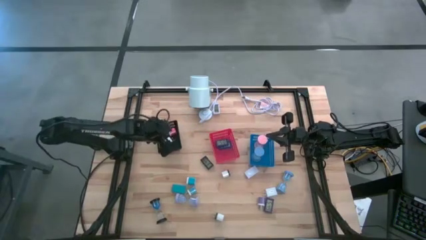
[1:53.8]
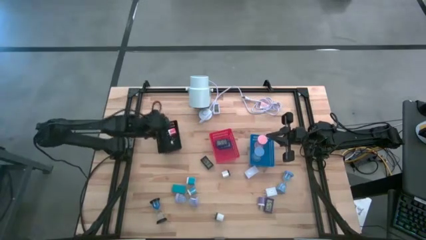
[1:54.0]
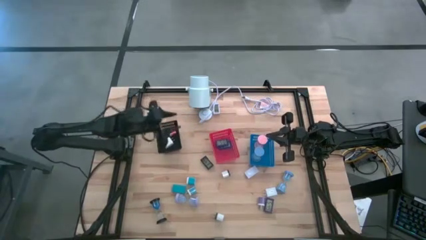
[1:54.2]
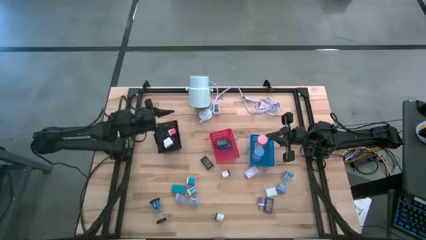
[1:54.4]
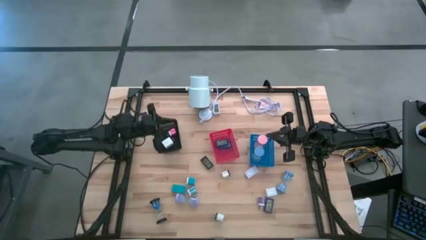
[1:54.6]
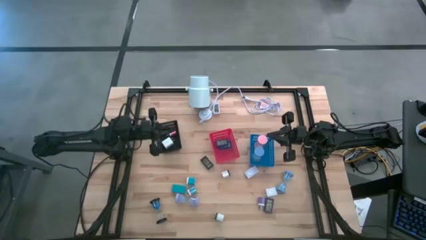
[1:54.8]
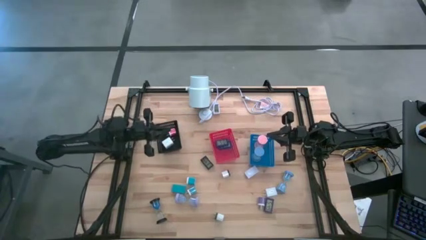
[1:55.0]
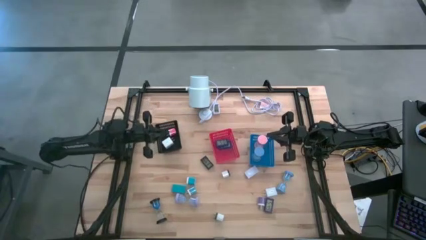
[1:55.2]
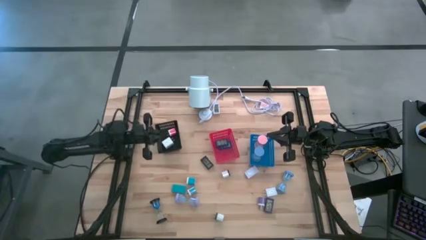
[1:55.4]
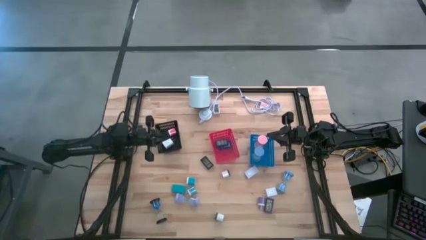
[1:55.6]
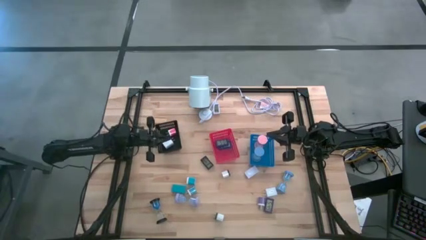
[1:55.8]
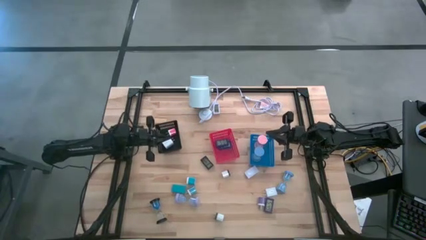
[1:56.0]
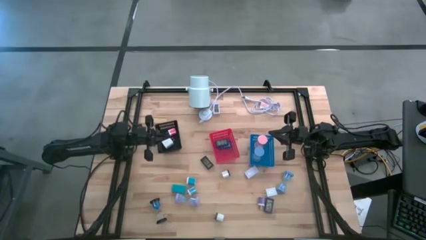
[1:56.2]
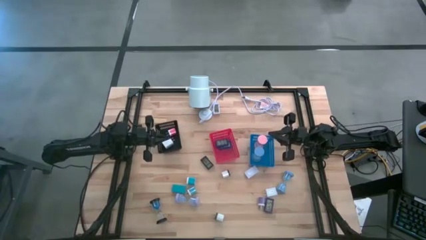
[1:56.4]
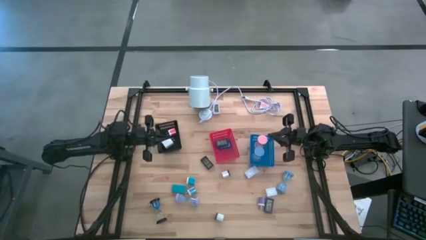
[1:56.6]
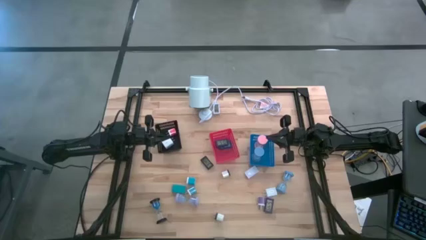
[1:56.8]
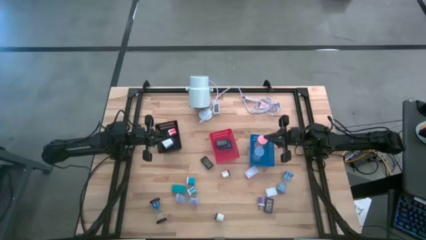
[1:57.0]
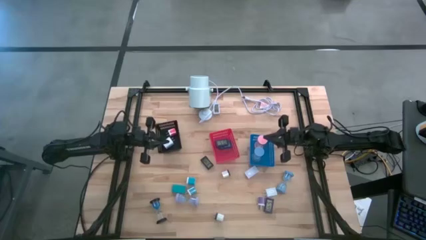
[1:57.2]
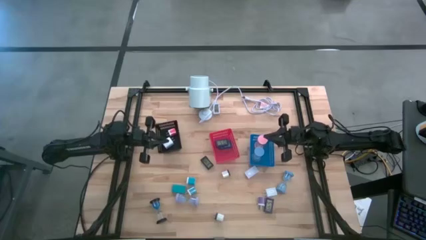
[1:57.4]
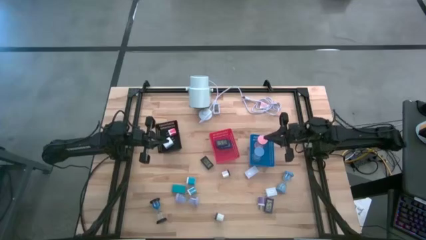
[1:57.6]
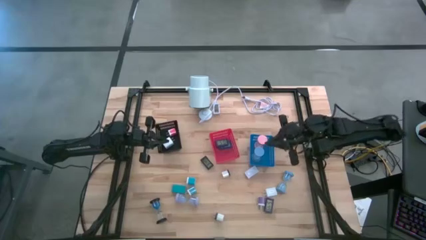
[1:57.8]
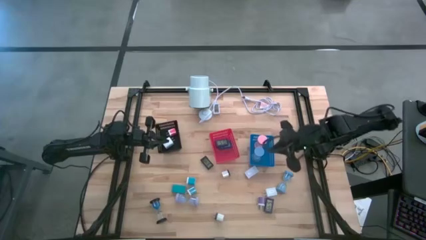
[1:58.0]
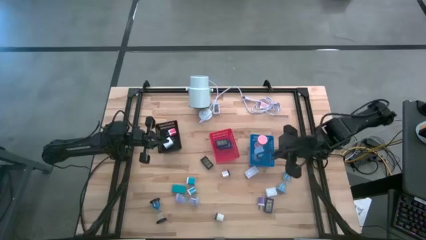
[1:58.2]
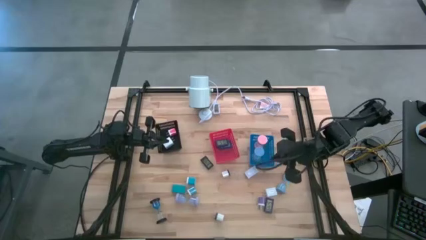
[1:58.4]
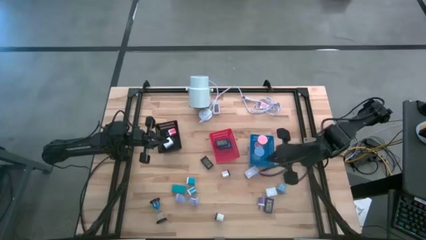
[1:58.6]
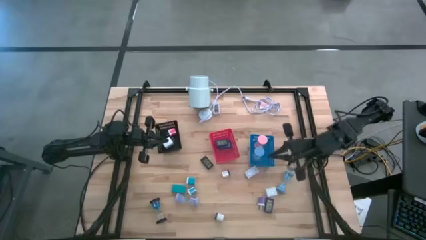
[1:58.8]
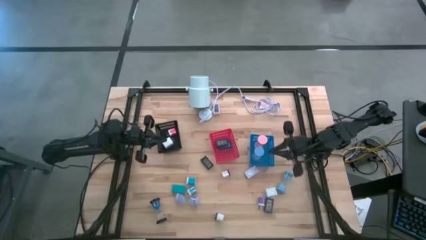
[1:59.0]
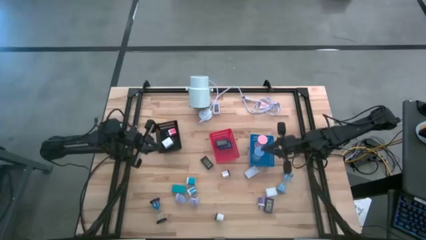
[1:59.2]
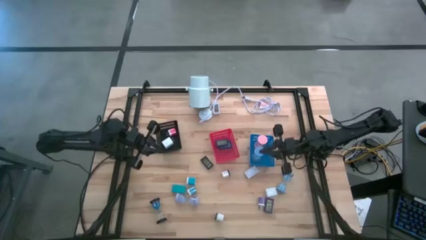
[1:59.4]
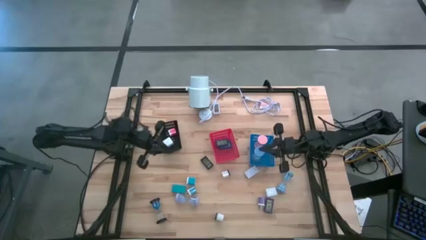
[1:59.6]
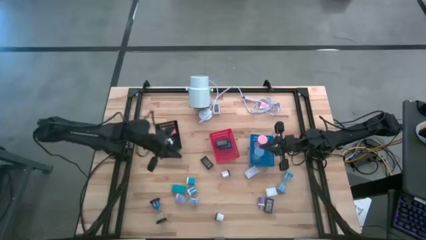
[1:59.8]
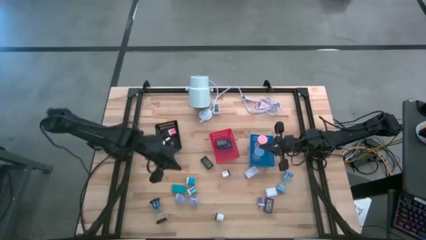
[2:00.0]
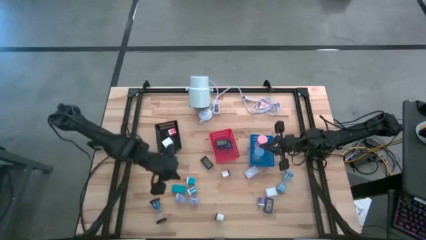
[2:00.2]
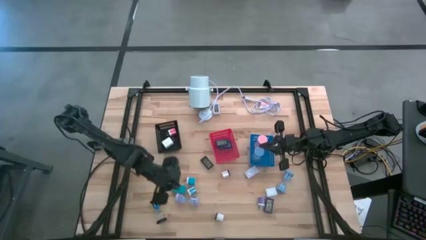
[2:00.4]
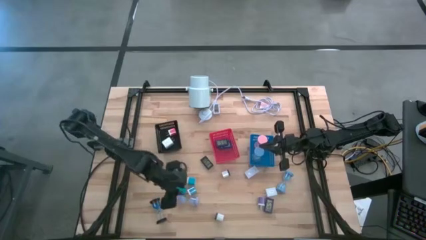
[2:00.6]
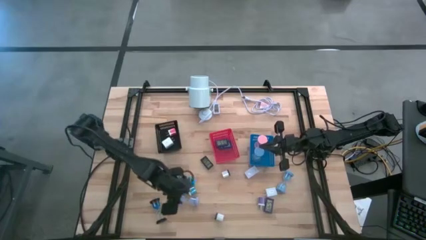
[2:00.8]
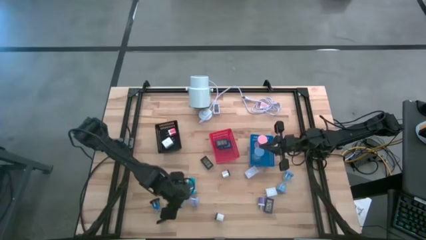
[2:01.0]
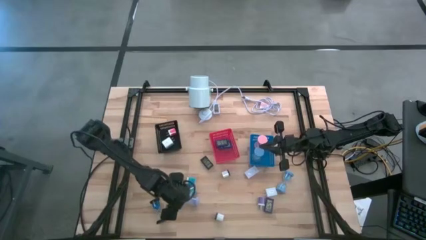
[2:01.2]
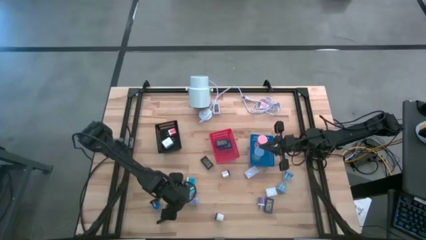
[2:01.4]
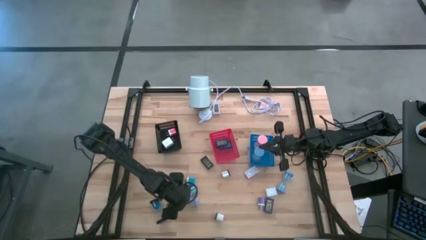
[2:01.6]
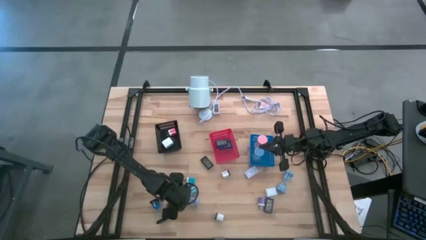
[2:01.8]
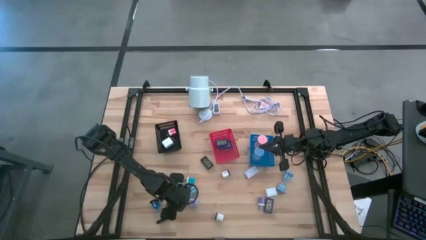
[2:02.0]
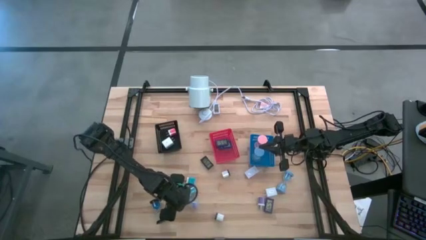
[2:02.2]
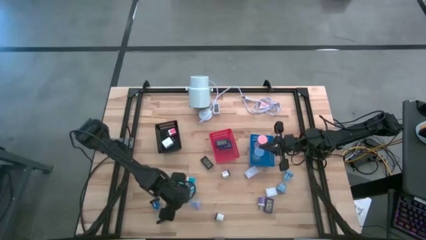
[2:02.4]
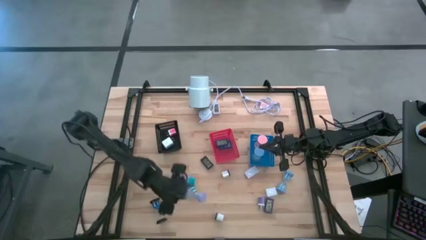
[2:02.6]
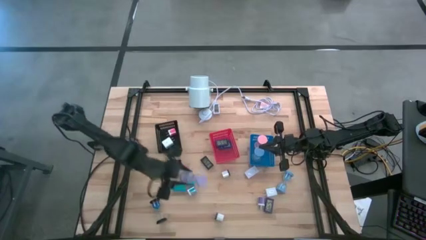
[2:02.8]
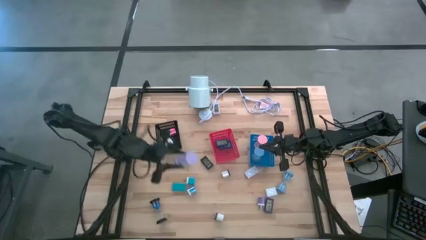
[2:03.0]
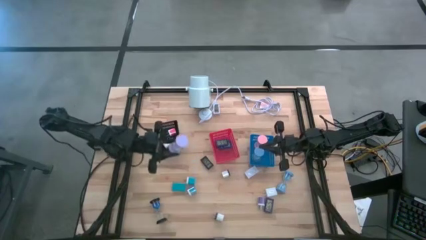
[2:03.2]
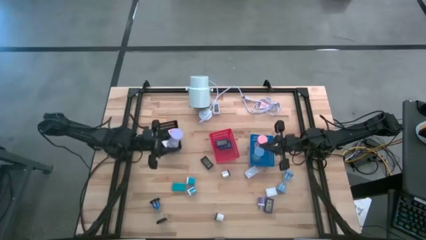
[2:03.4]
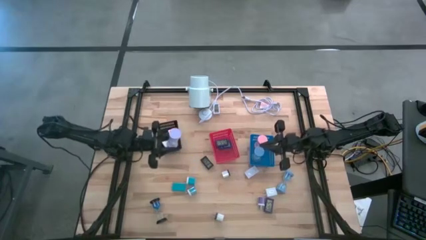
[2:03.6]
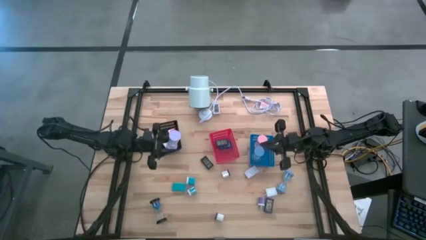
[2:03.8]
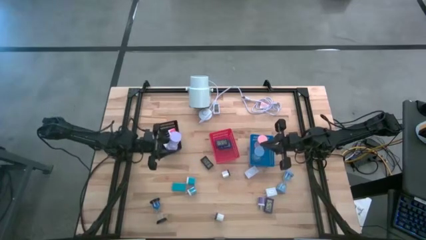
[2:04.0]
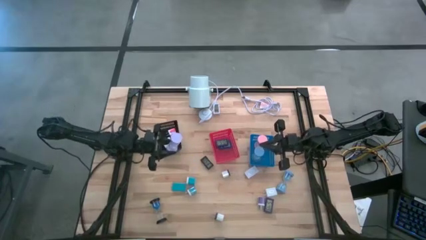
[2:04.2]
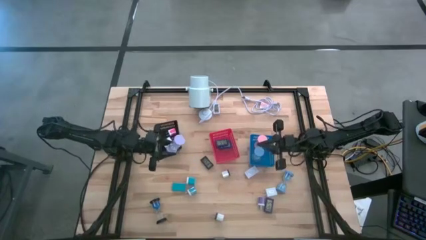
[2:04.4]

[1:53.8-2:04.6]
Task: Pick & Place Office items
Put the purple hourglass into the blue bin

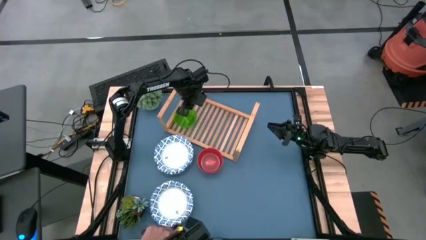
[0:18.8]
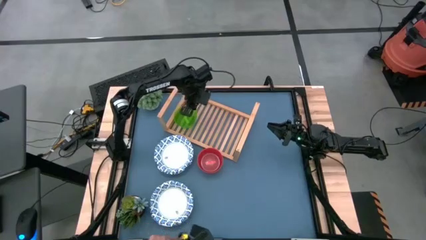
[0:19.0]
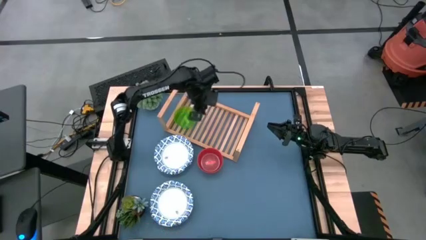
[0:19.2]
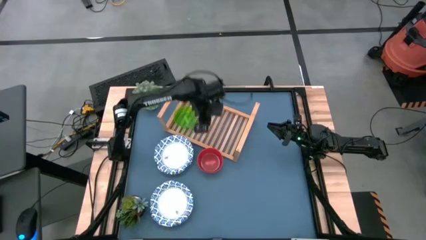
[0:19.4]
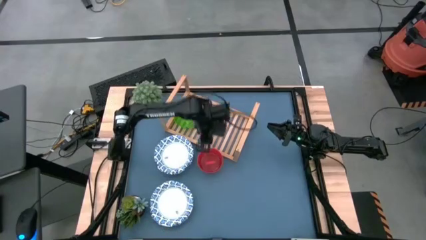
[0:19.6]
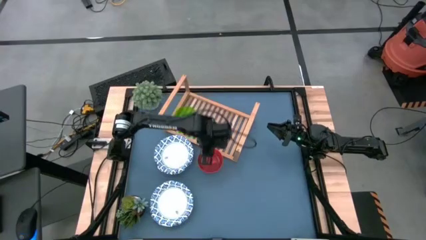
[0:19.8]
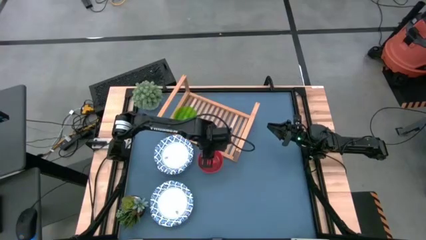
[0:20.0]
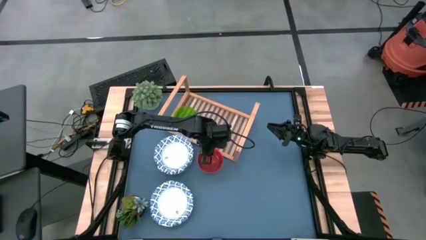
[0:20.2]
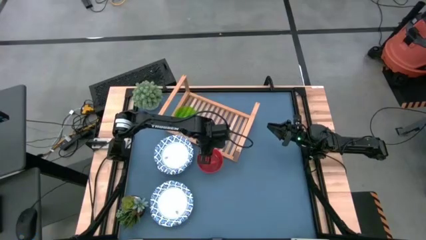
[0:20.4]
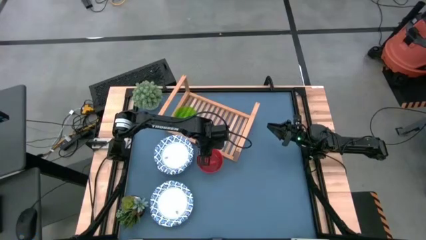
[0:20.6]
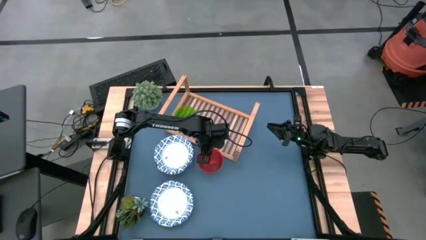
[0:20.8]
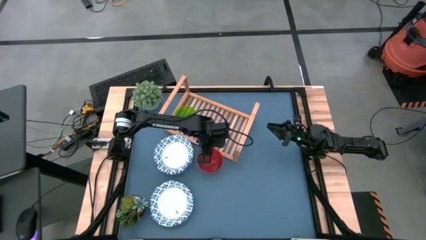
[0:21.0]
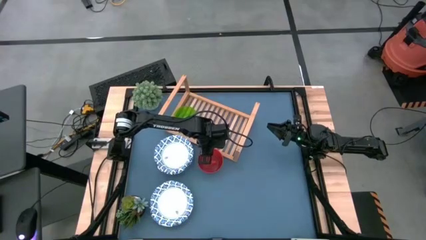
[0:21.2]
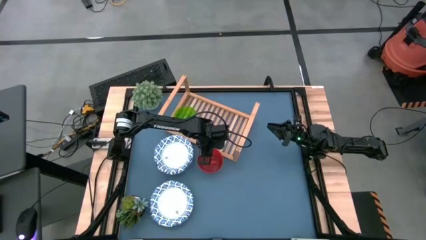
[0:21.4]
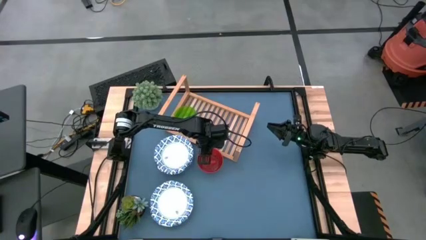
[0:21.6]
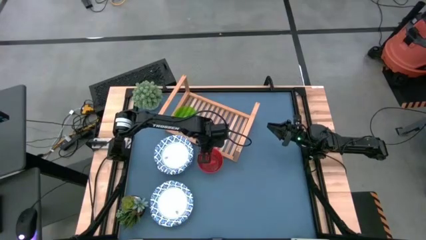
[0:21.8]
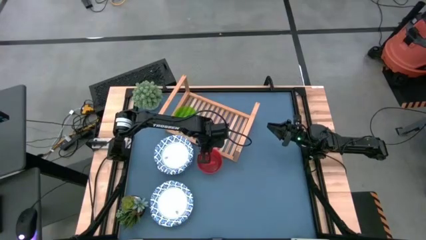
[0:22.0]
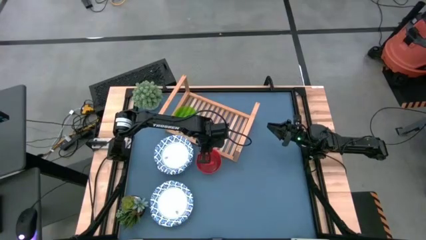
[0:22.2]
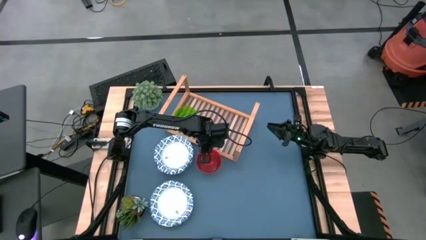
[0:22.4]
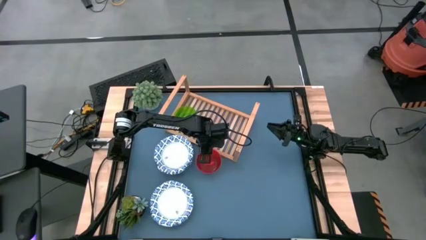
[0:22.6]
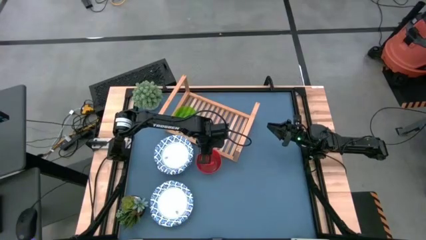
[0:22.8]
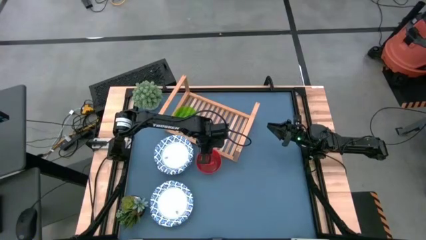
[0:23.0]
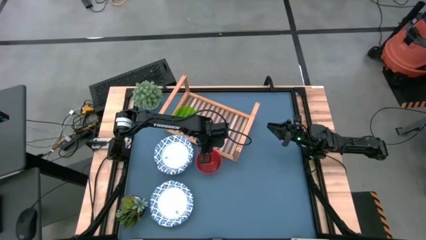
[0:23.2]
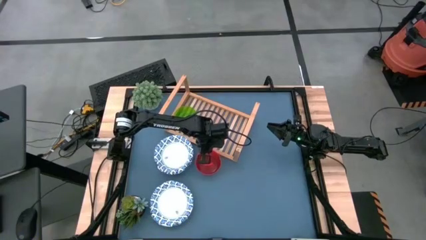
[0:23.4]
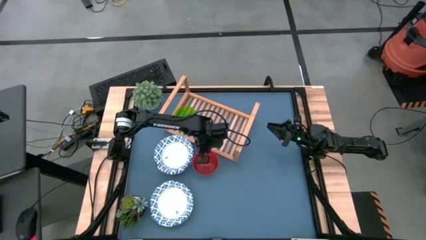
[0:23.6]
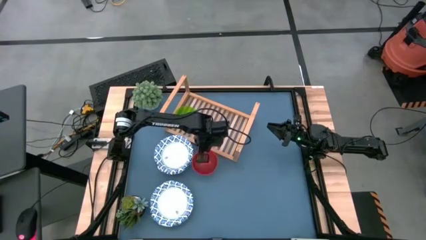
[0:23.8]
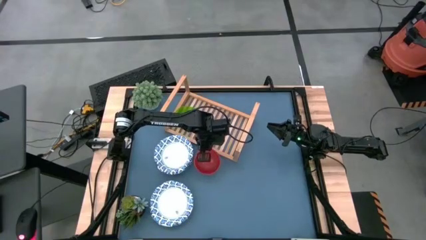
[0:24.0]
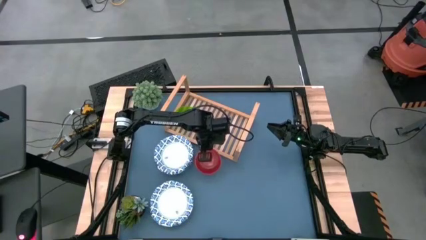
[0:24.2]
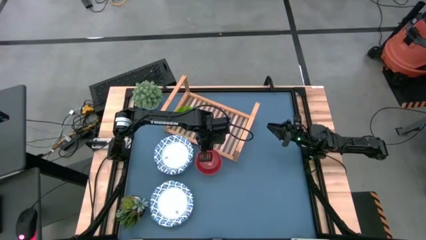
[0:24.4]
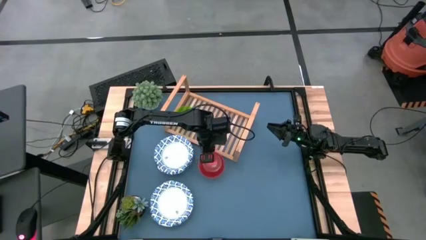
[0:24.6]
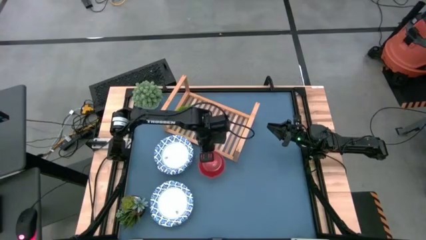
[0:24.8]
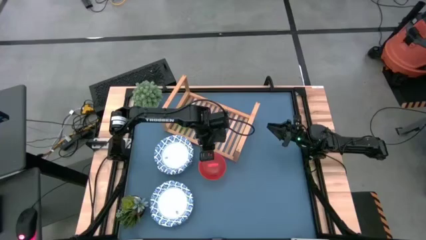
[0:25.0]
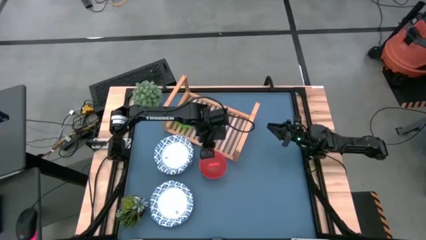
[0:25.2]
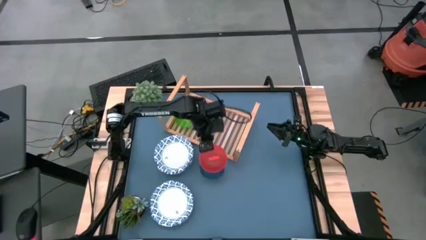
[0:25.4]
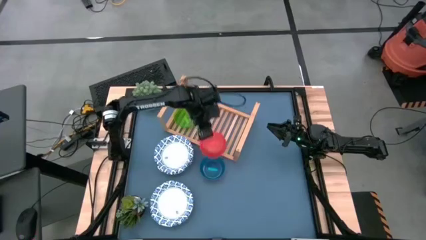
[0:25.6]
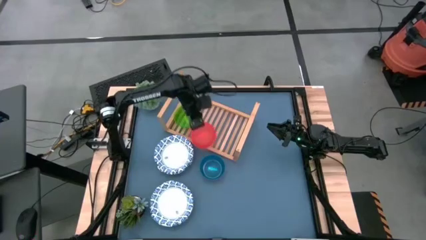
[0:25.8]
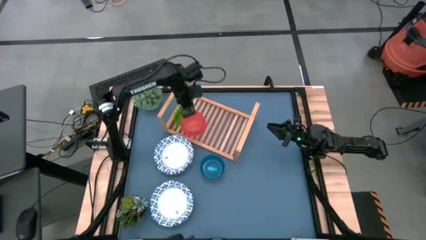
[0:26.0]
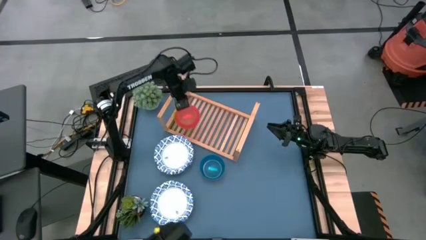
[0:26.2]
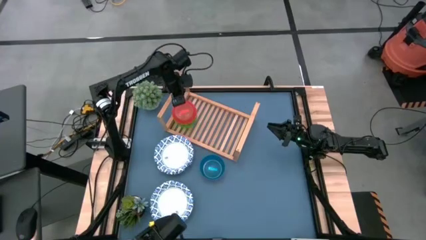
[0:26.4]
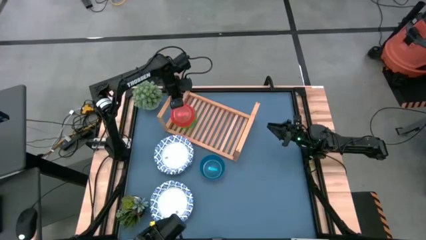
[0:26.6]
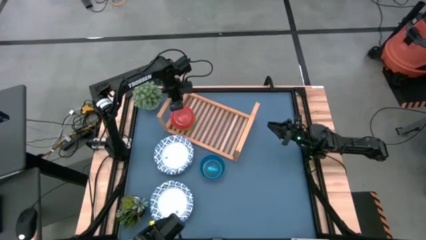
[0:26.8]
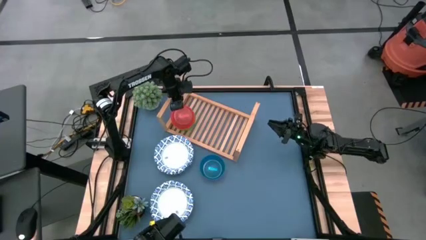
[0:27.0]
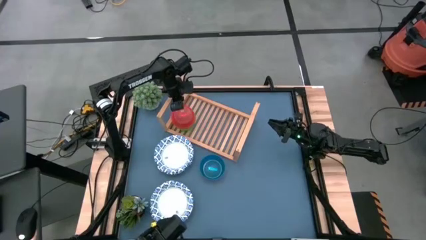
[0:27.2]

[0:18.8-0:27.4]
Task: Place and stack bowls onto a shelf
Stack the small orange bowl on top of the small green bowl on the shelf
